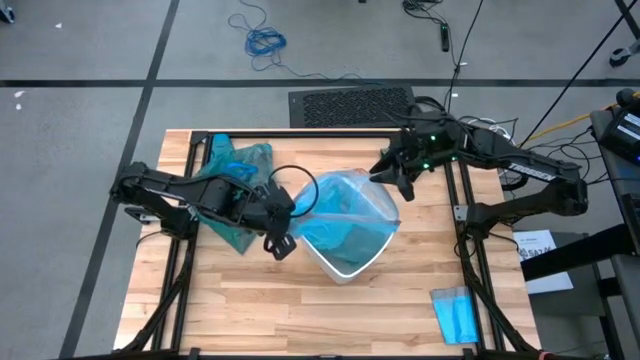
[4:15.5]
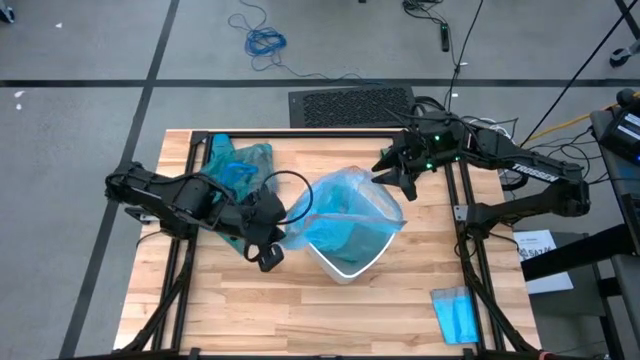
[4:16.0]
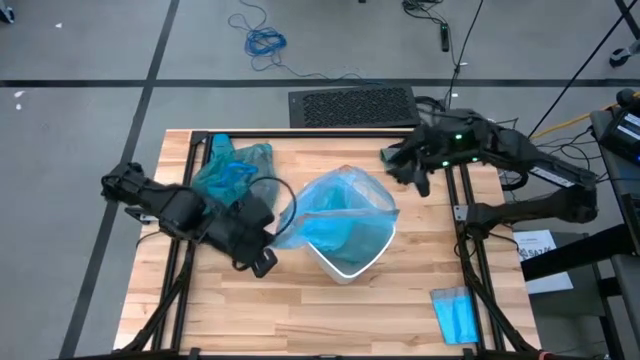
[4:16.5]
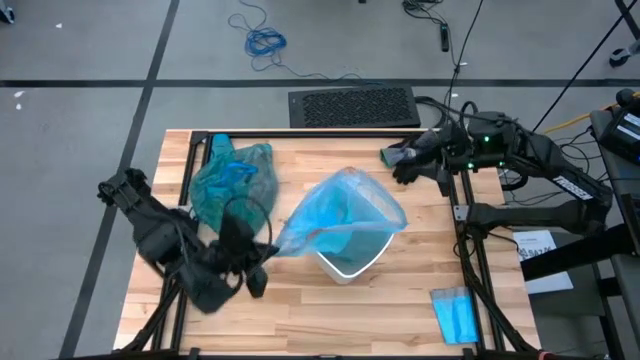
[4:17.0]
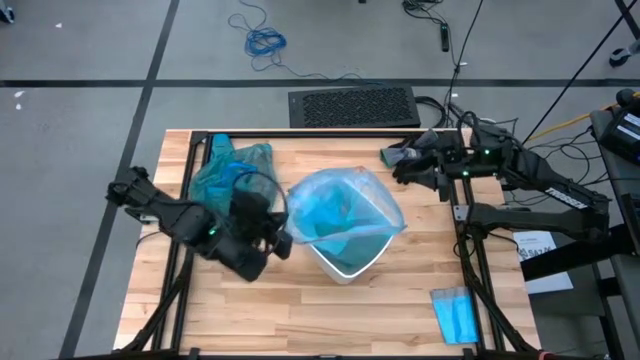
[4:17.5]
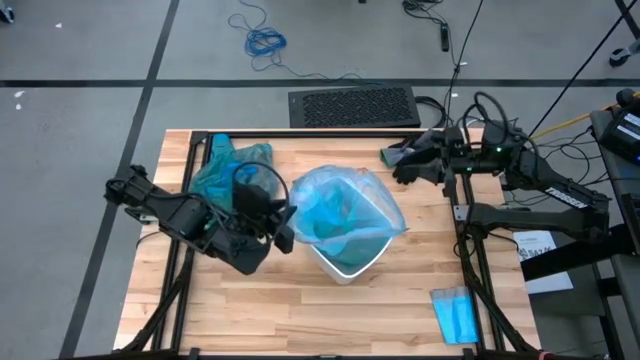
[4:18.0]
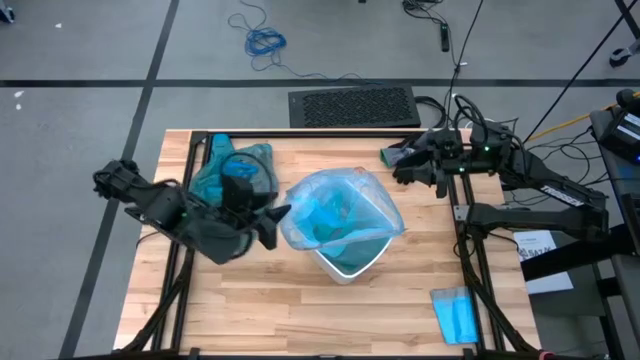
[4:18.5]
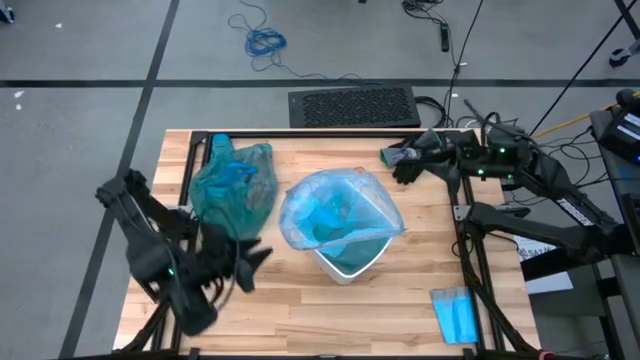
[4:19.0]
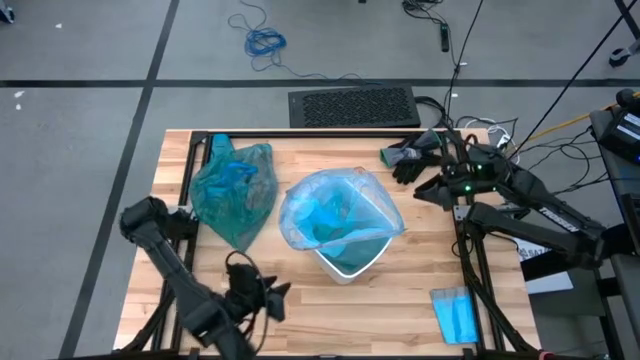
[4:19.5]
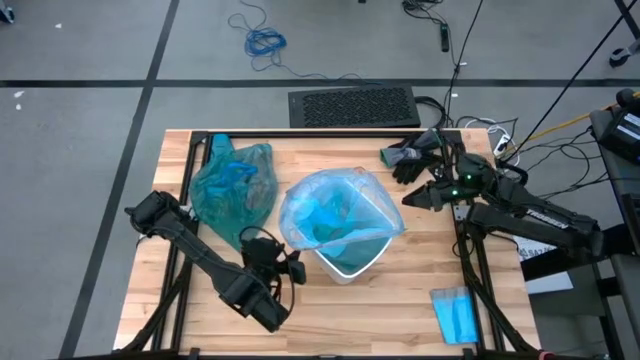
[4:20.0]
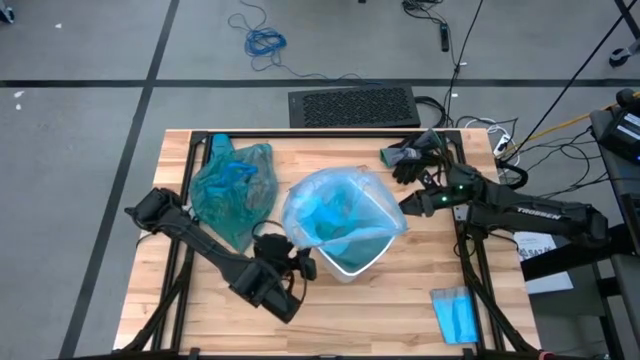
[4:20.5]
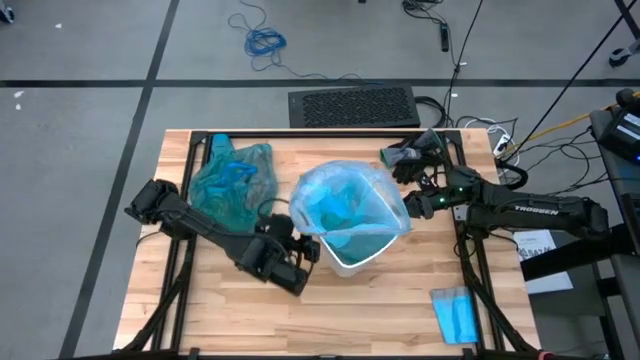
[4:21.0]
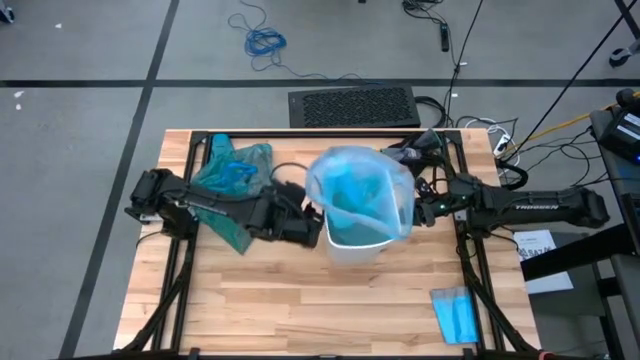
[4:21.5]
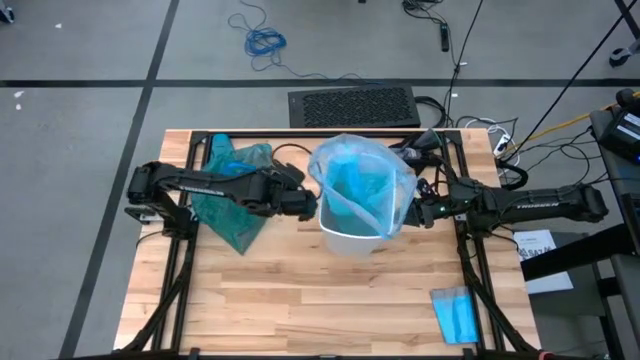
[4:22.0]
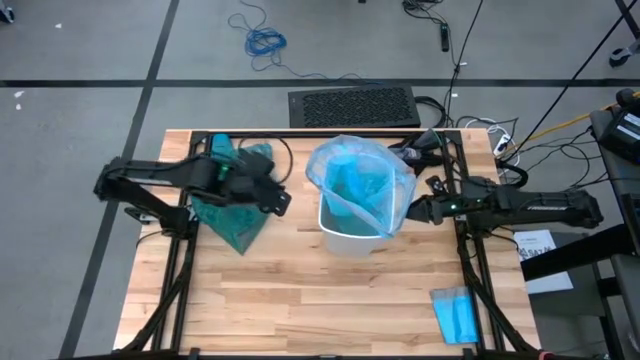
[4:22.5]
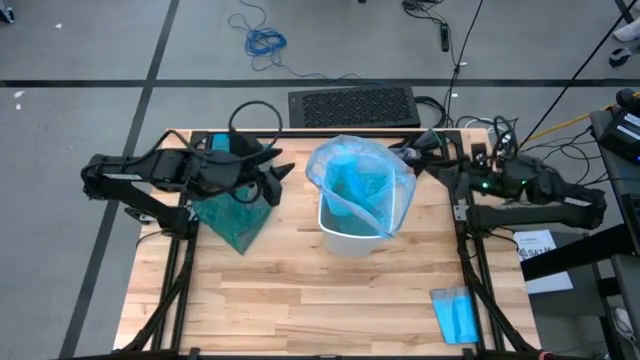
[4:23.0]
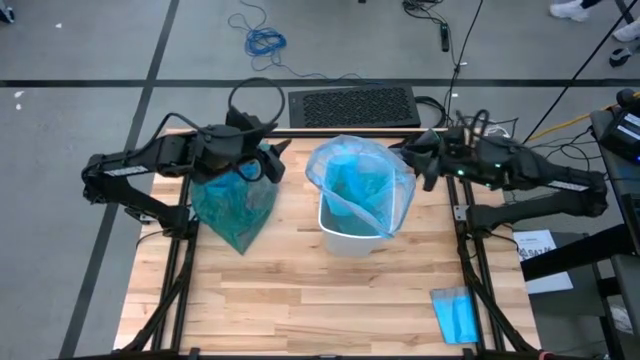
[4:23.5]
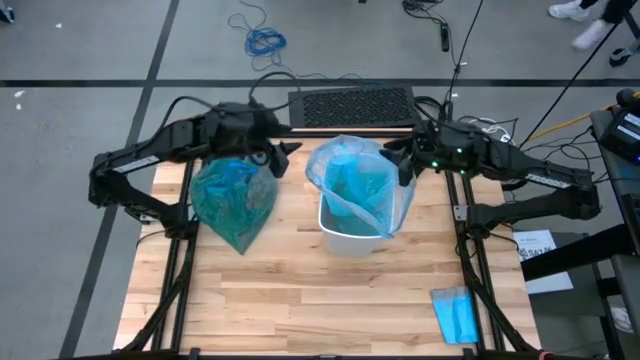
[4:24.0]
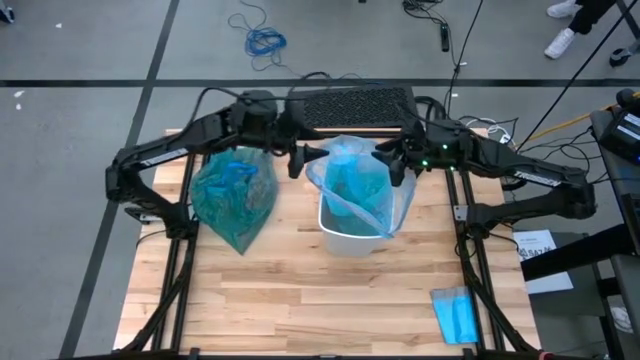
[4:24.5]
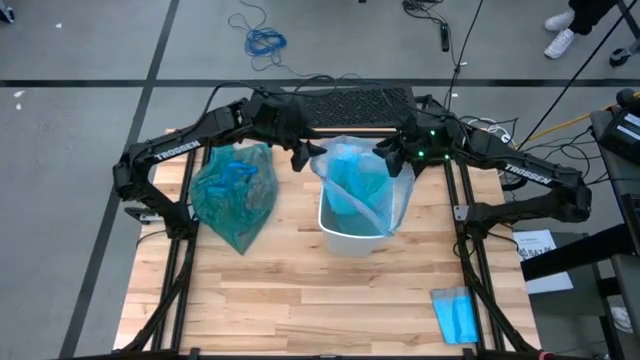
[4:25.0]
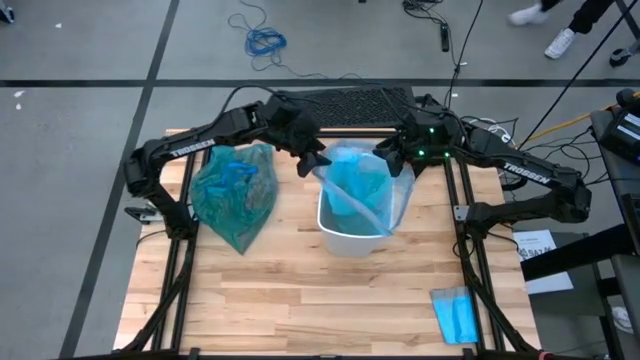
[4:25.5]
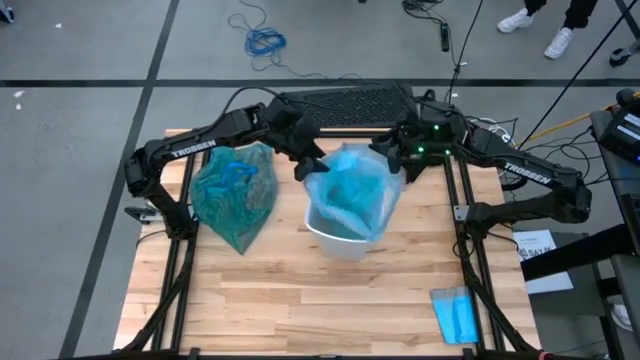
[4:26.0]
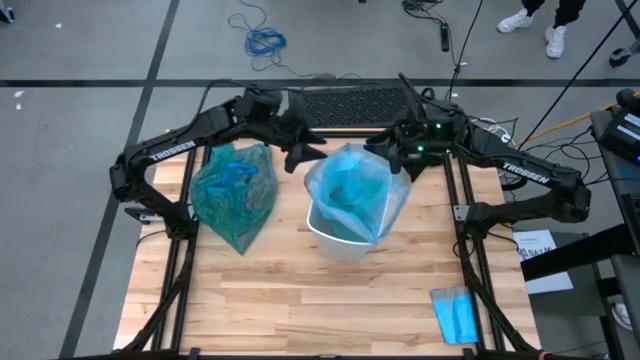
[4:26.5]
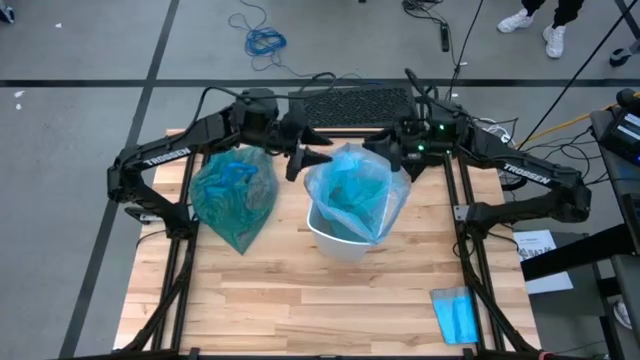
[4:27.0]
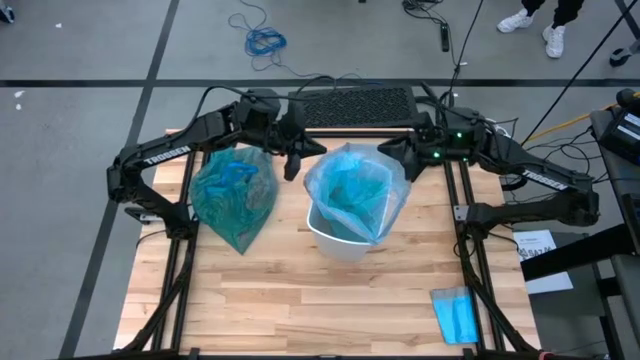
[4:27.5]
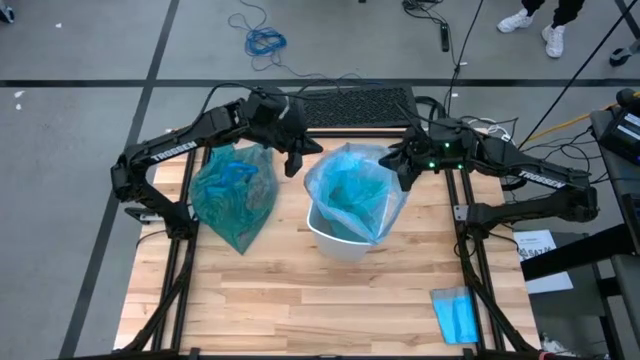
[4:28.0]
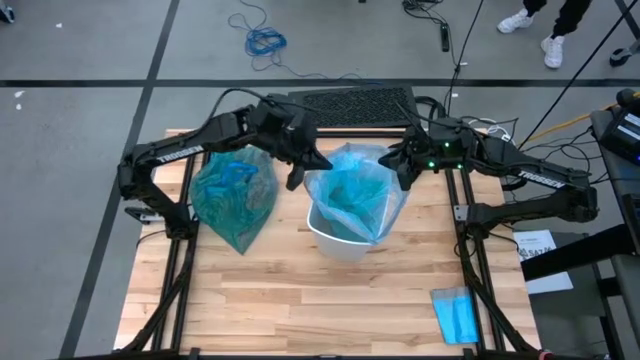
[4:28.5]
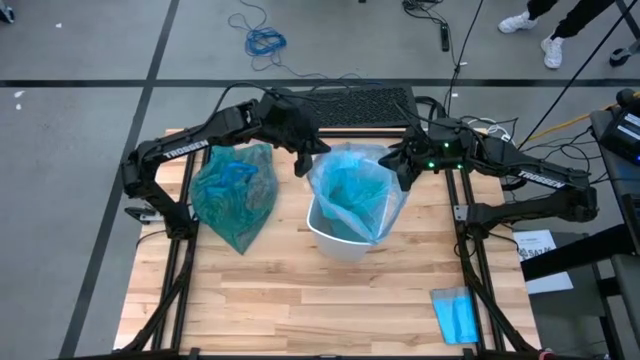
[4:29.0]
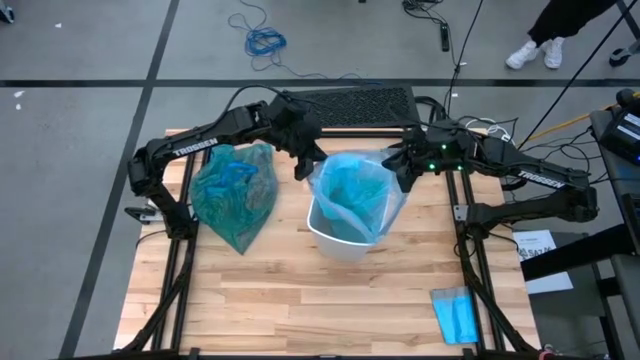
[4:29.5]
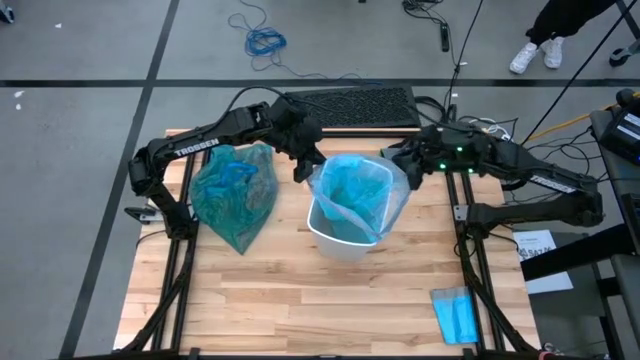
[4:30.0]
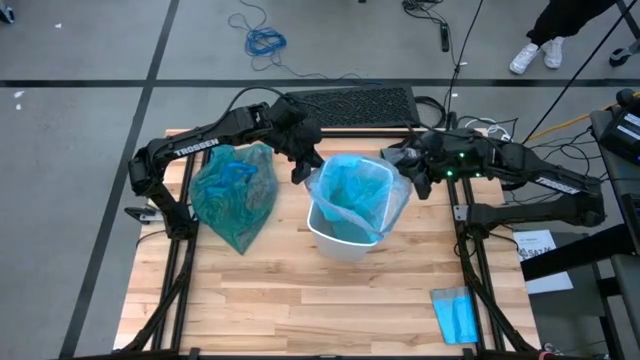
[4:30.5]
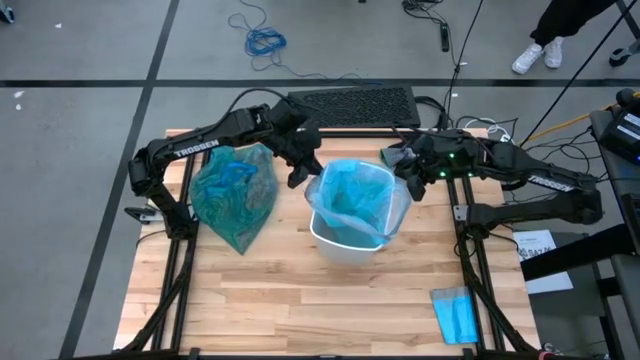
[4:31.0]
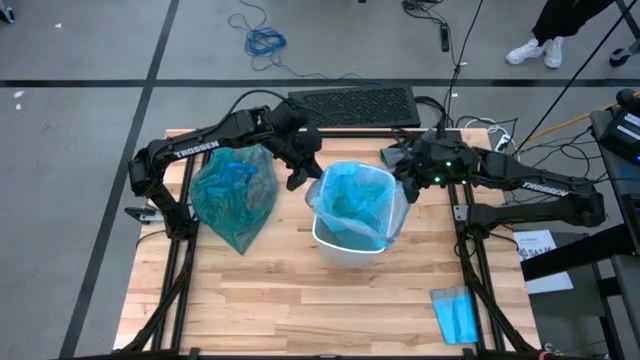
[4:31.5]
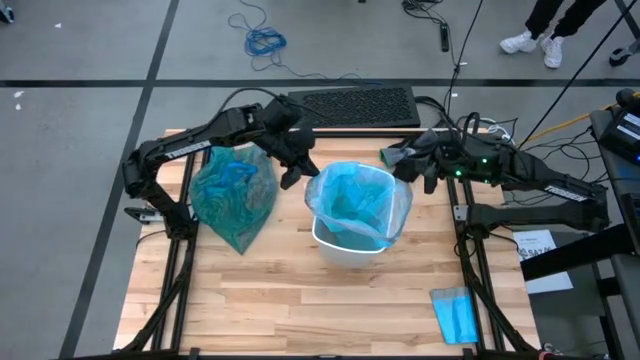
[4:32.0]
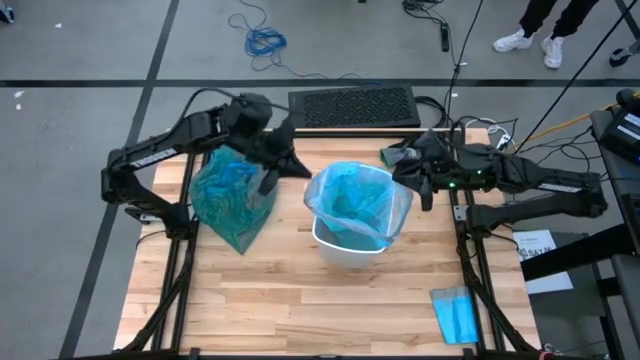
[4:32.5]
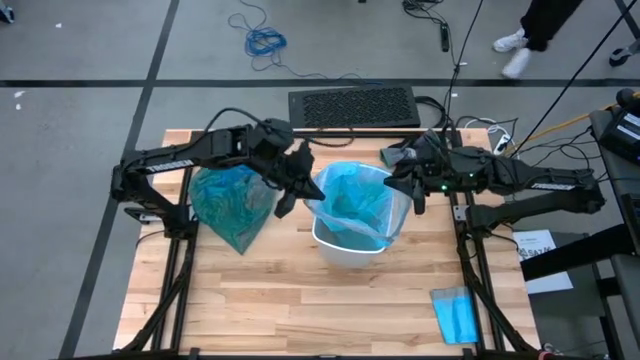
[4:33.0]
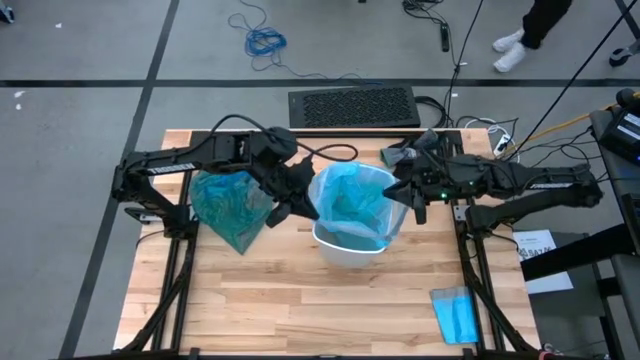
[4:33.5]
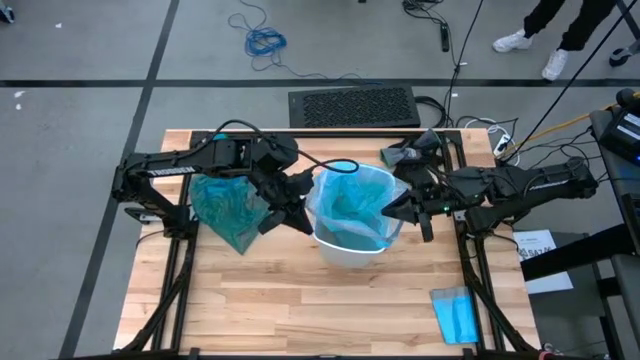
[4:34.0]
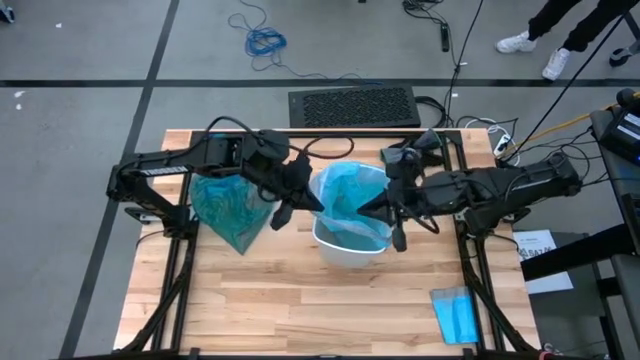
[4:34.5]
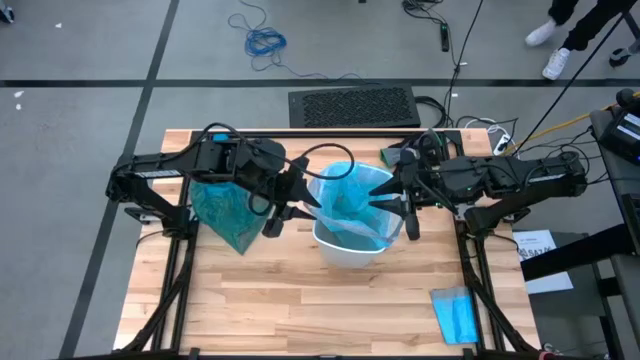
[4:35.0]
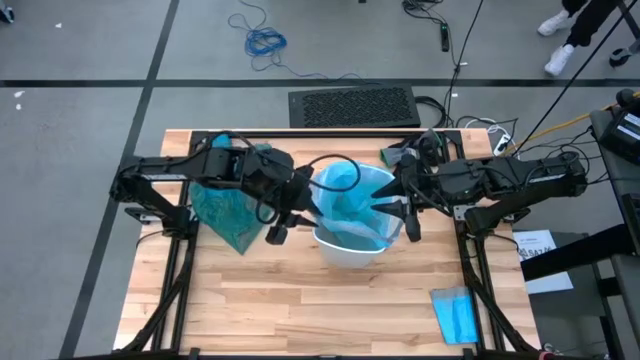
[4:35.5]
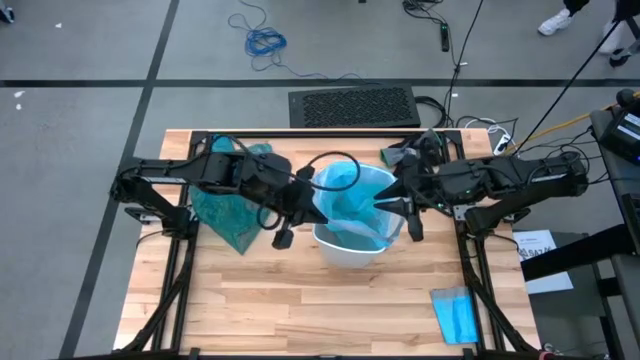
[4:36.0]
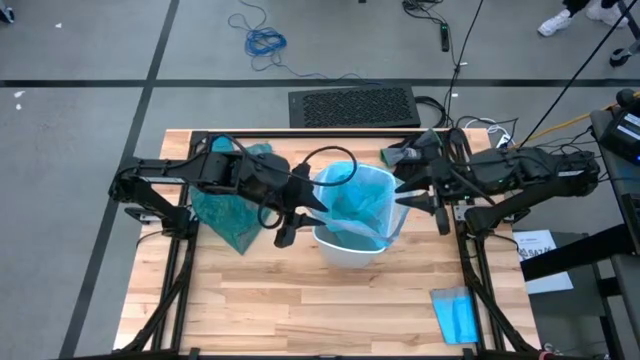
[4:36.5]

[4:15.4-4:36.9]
Task: place trash/remove bag and relplace
Insert the new blue trash bag into the trash bin
